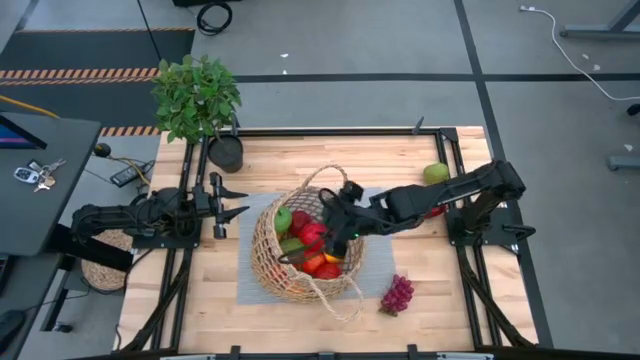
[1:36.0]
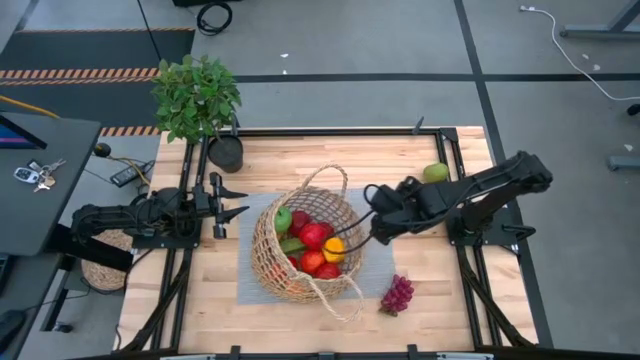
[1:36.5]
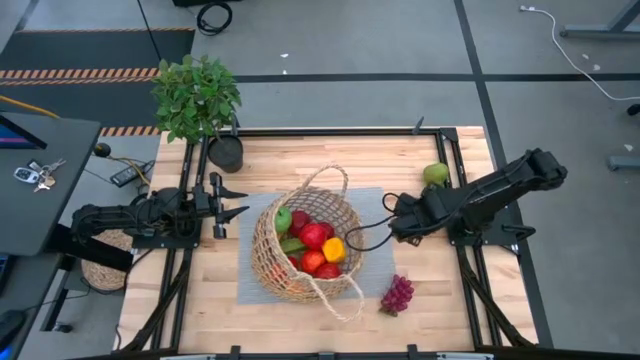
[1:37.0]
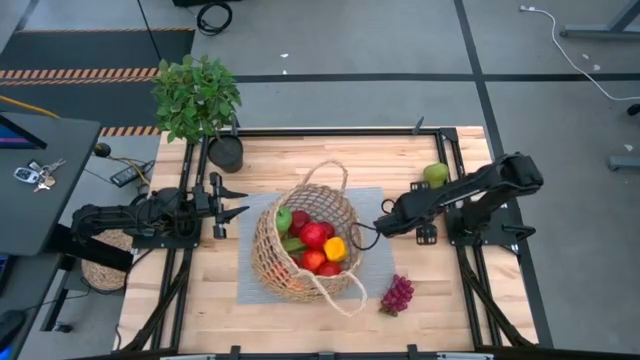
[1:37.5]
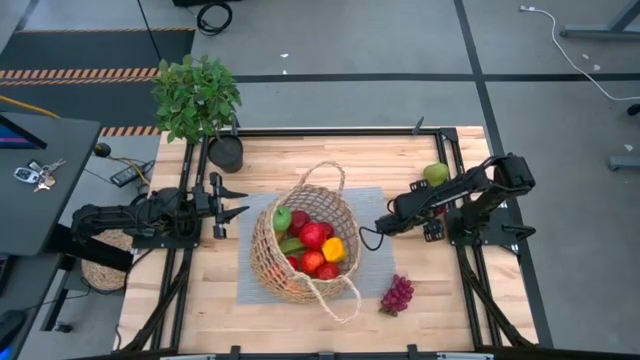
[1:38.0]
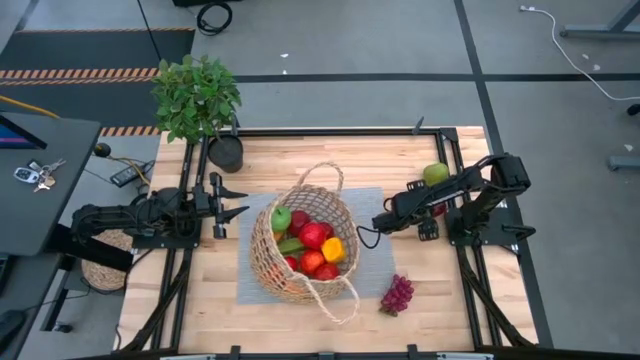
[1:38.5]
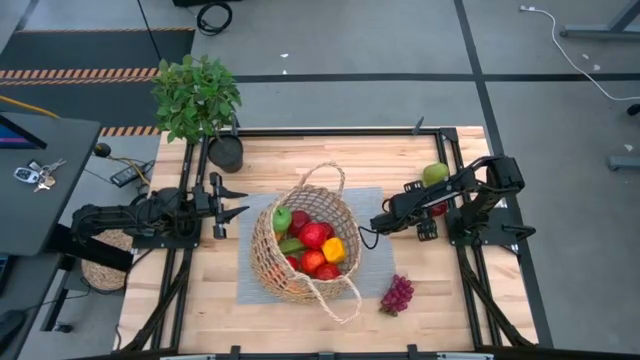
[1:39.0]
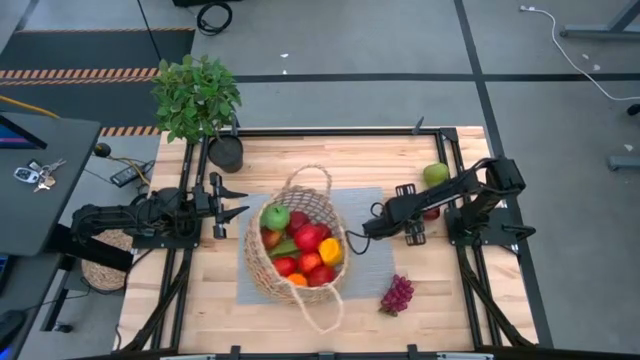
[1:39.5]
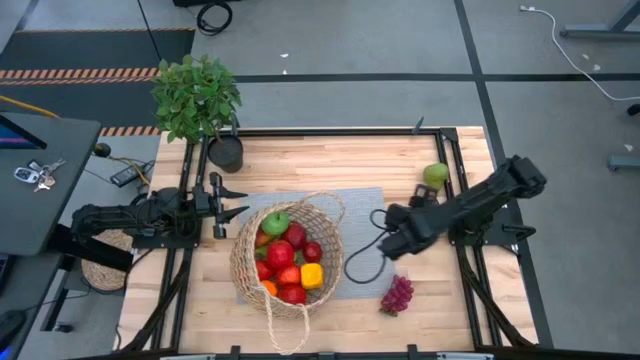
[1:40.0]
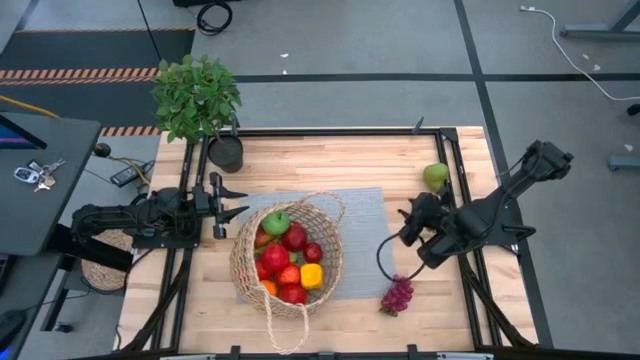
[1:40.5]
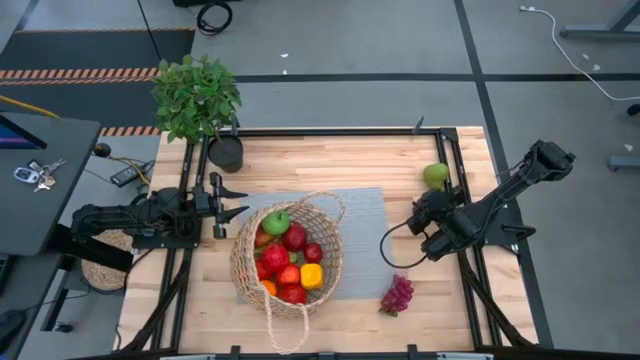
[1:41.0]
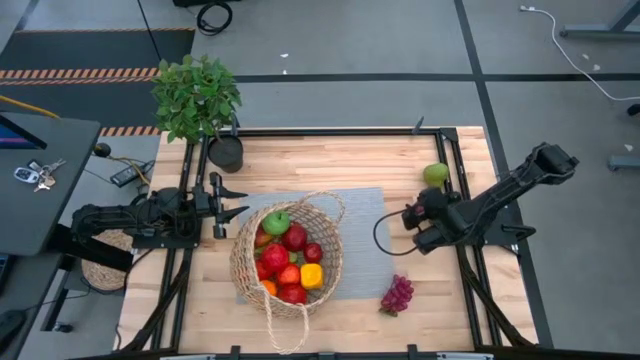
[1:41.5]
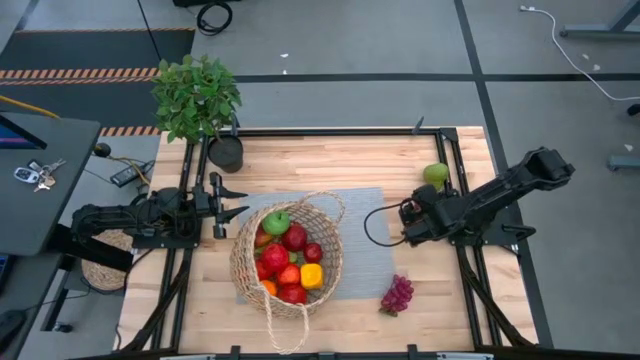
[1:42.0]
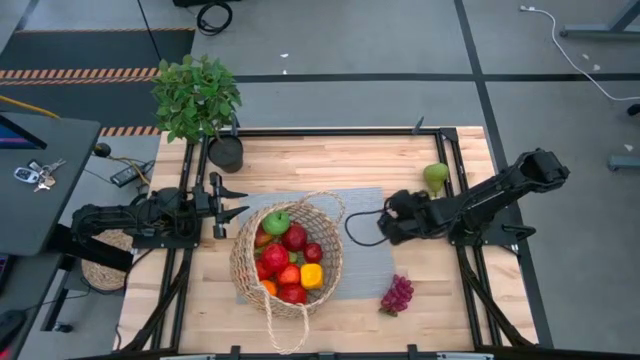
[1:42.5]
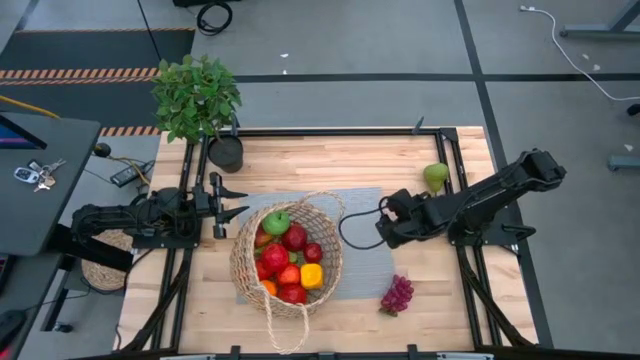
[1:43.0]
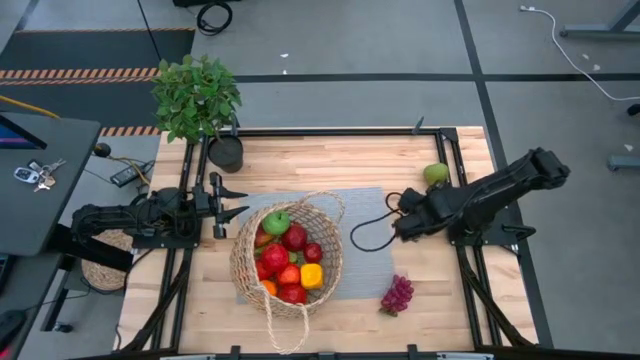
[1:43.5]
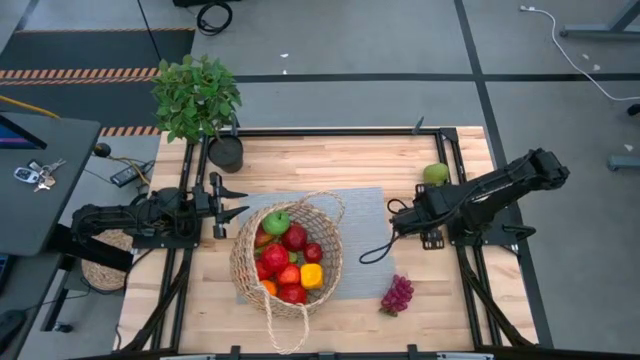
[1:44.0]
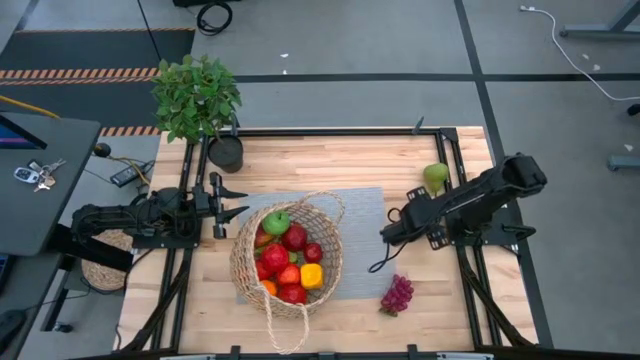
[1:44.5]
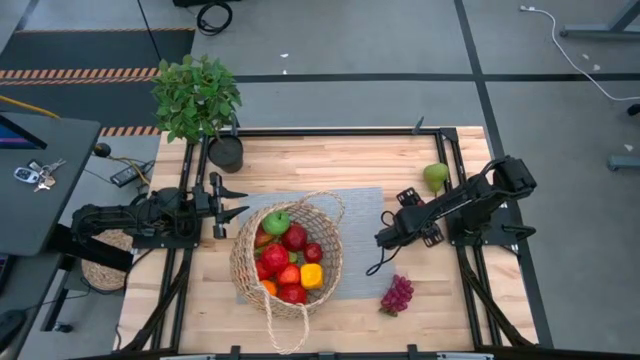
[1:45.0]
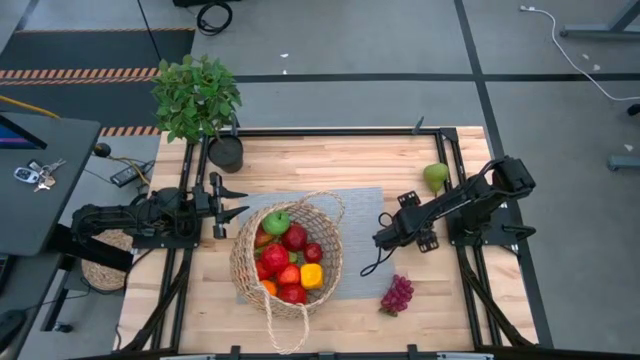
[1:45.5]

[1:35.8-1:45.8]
Task: Build produce basket
Put the red apple into the brown basket

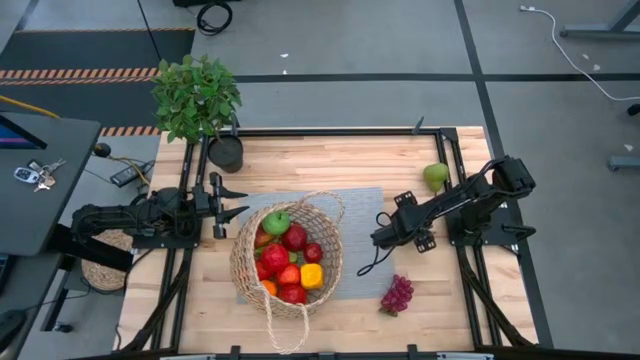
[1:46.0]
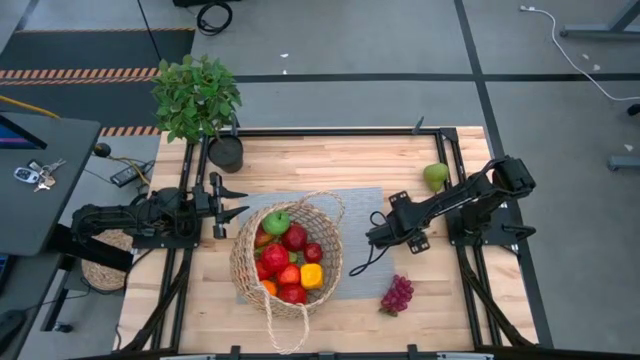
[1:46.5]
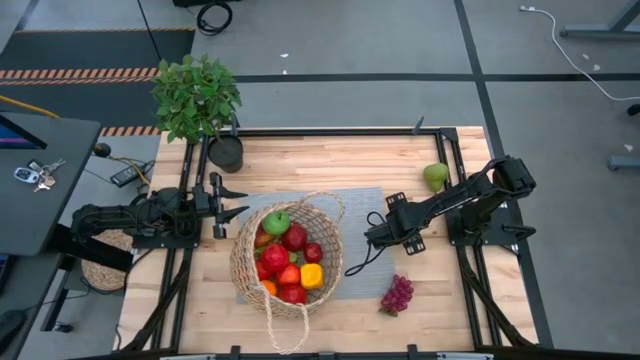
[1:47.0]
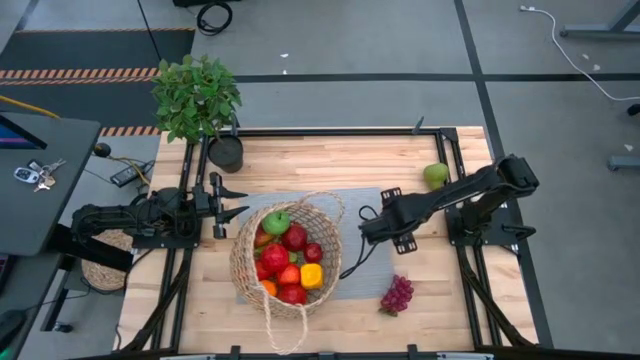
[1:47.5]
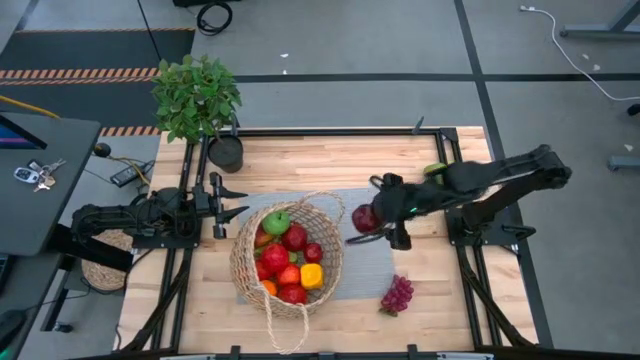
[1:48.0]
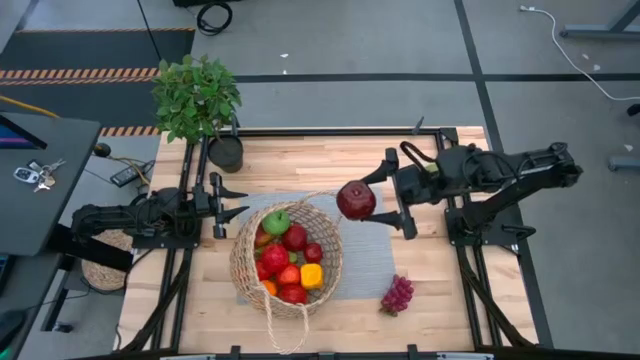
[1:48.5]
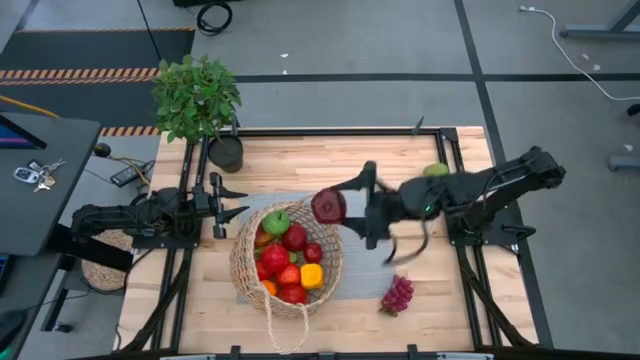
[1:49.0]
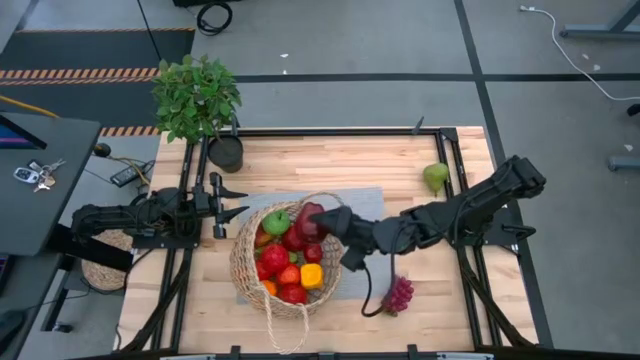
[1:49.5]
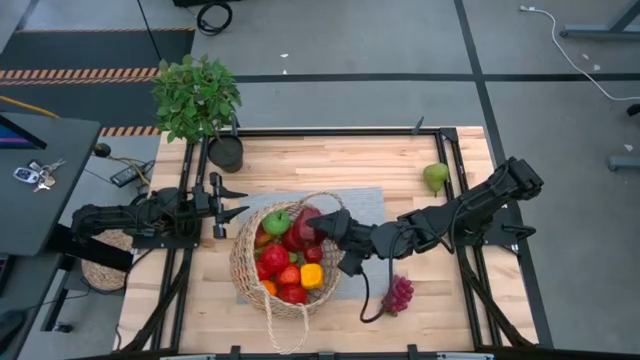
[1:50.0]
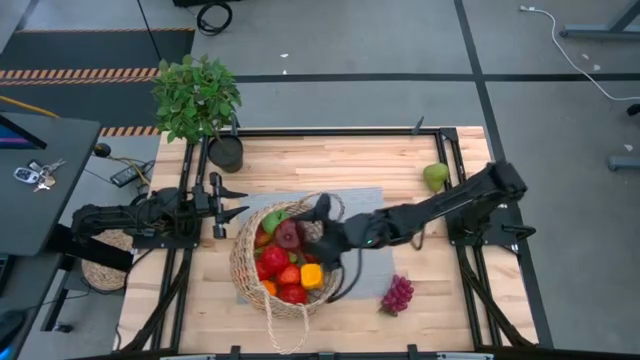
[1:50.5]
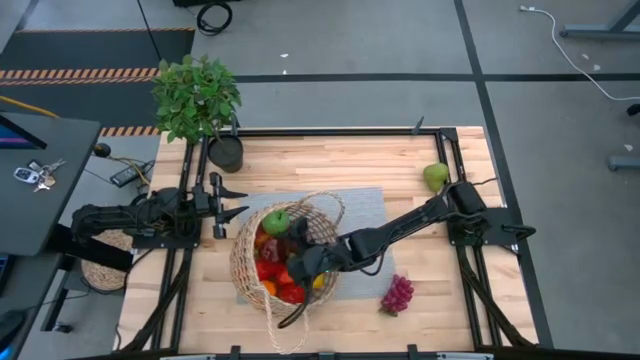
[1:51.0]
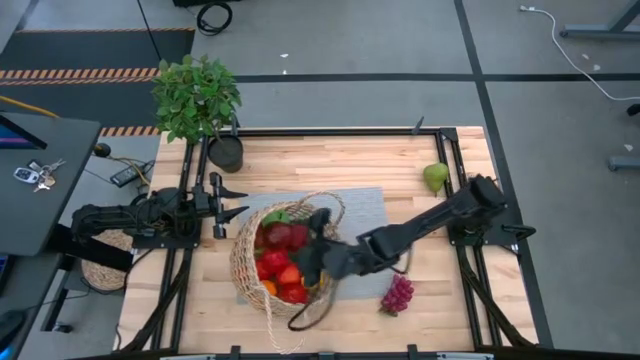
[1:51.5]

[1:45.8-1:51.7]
Put the red apple into the brown basket

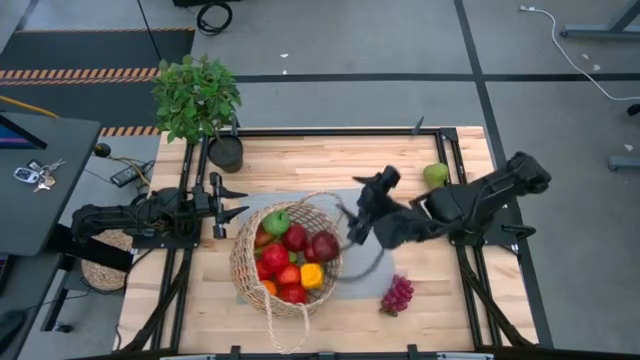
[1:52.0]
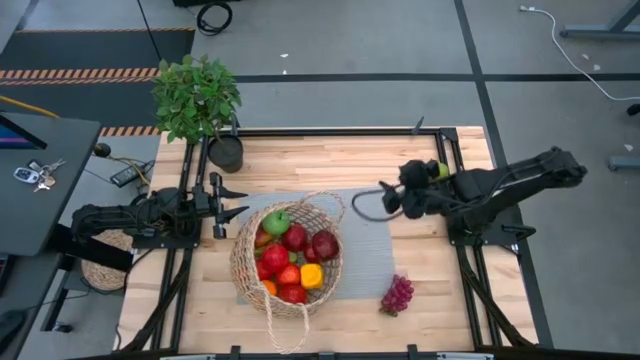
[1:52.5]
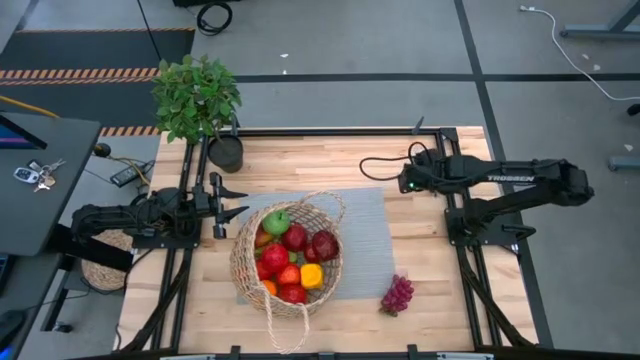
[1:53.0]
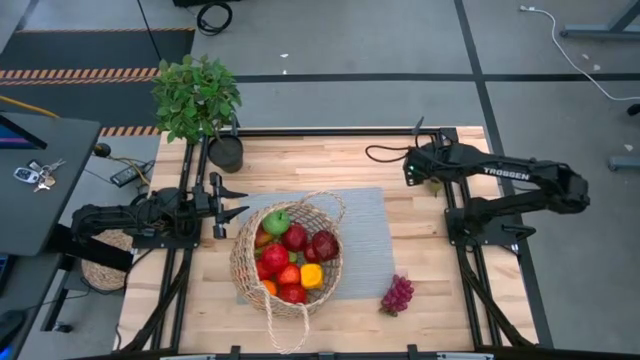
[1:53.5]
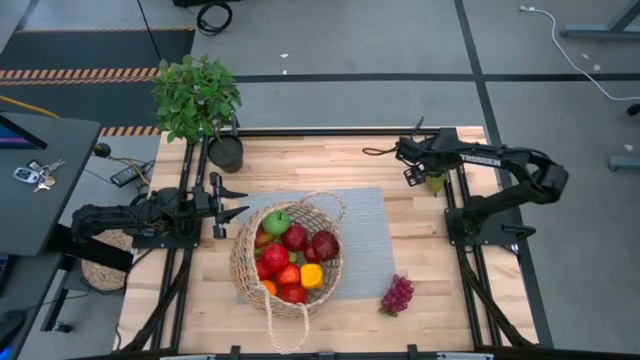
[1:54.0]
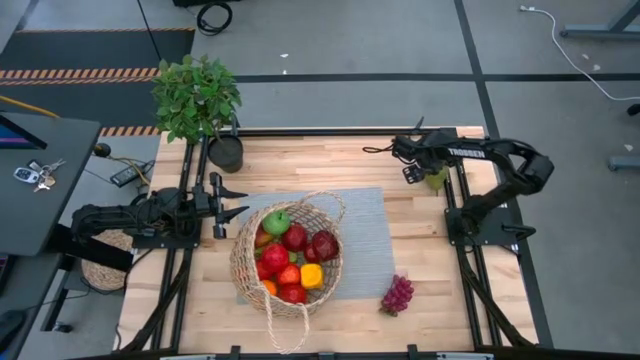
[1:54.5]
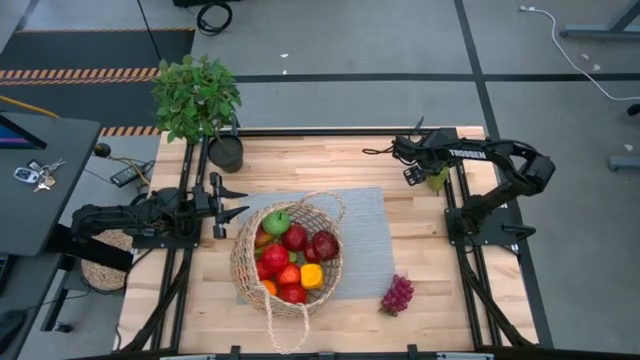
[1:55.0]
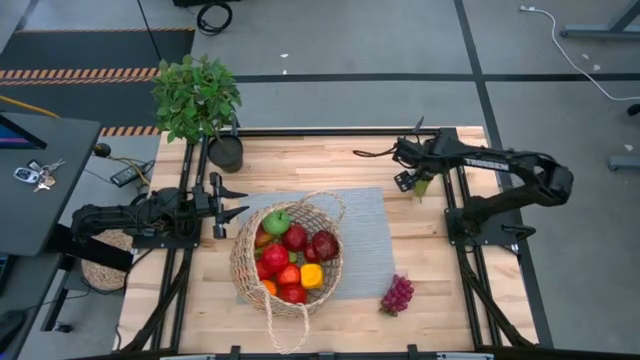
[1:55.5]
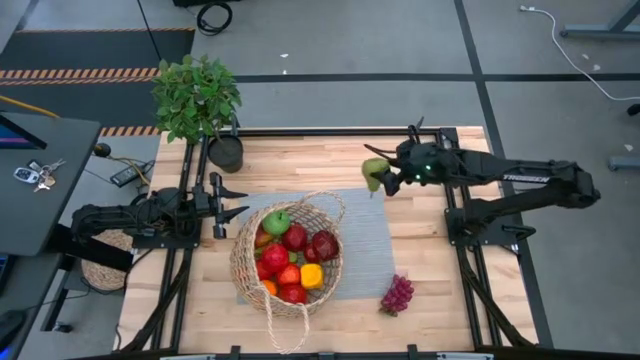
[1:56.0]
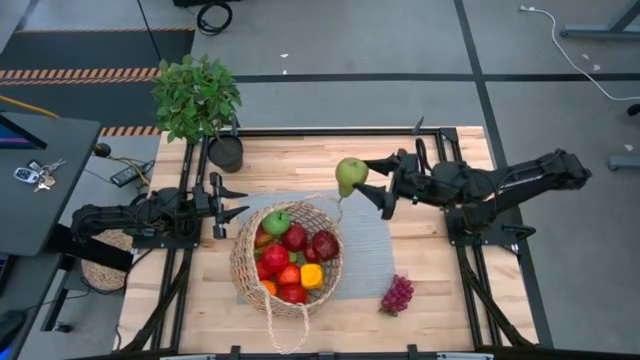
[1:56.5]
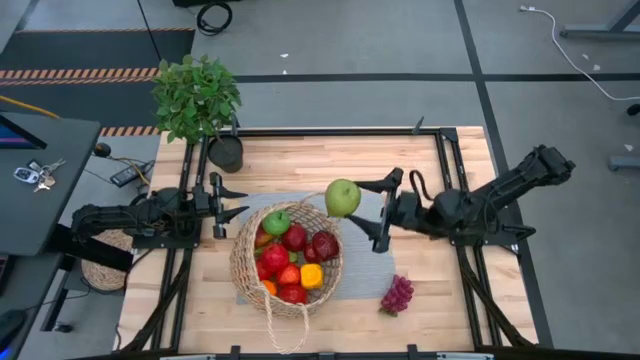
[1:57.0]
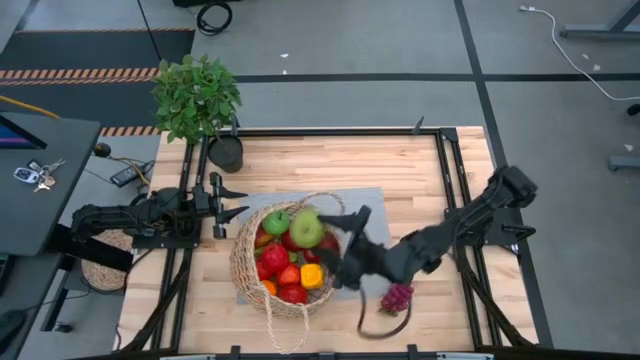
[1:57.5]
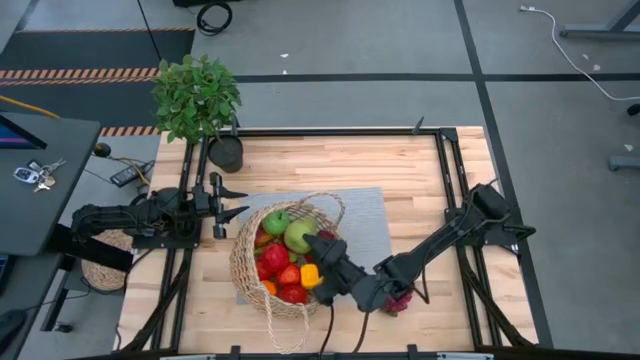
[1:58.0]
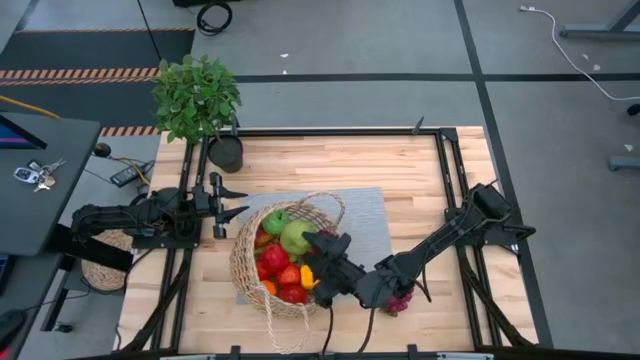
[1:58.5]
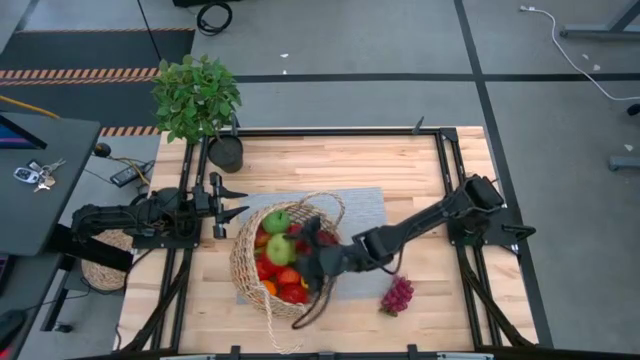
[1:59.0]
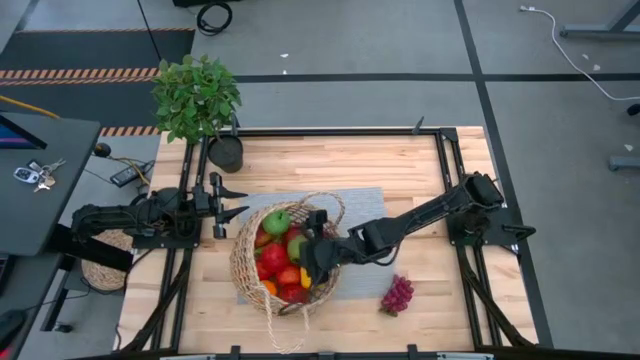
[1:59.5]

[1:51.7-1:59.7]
Put the green pear into the brown basket
